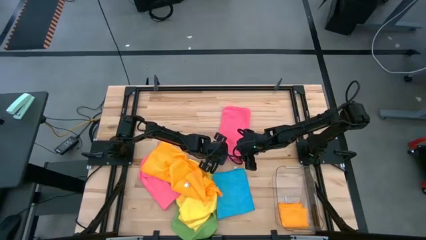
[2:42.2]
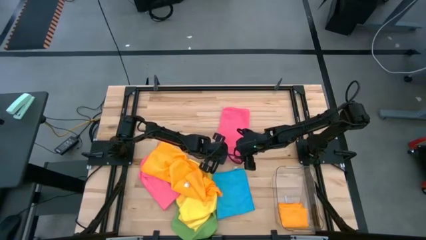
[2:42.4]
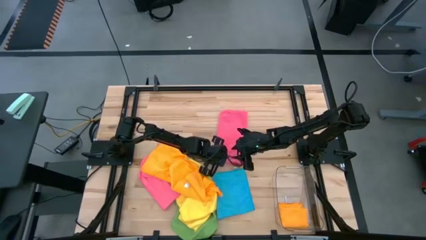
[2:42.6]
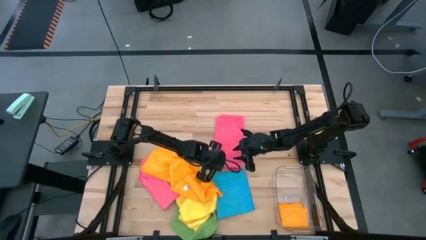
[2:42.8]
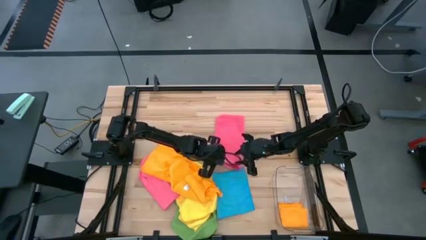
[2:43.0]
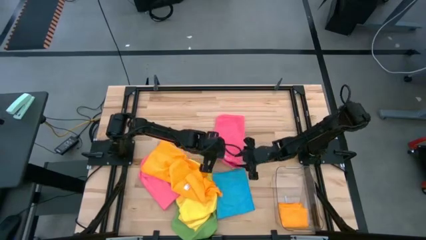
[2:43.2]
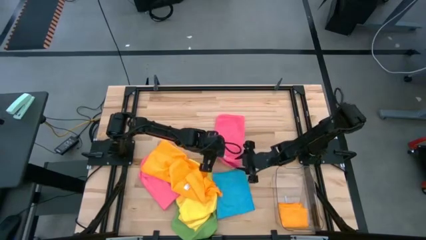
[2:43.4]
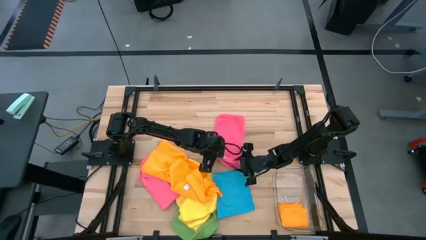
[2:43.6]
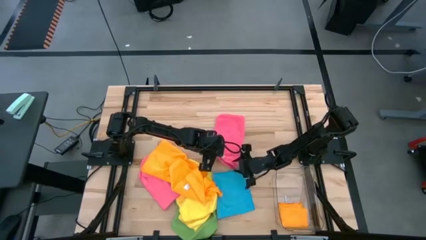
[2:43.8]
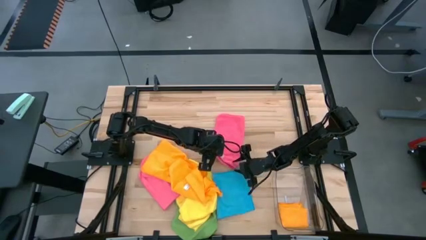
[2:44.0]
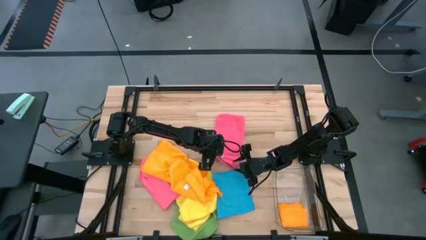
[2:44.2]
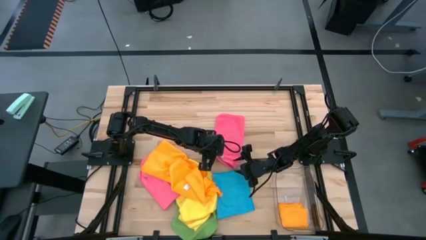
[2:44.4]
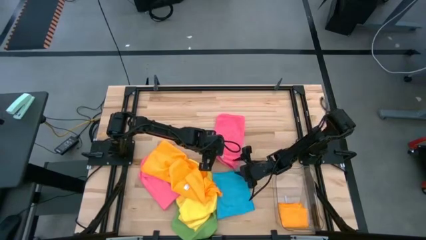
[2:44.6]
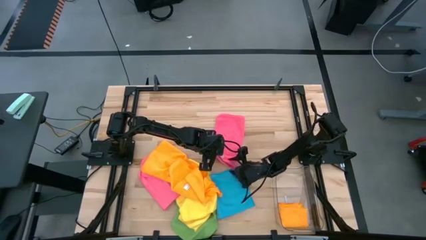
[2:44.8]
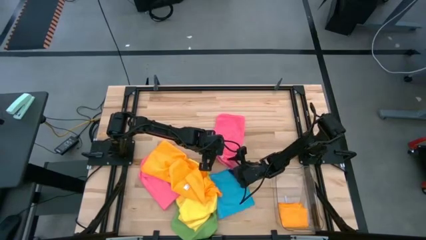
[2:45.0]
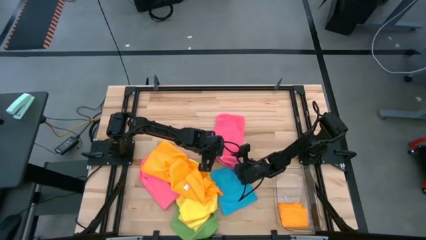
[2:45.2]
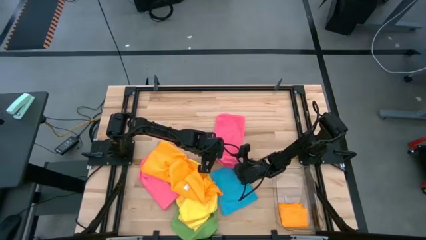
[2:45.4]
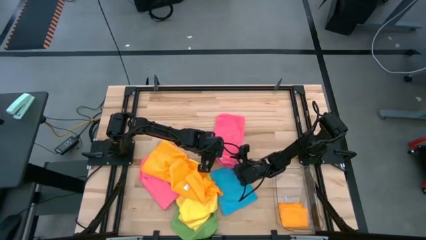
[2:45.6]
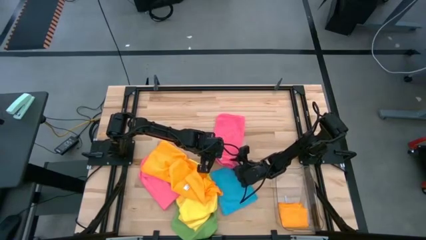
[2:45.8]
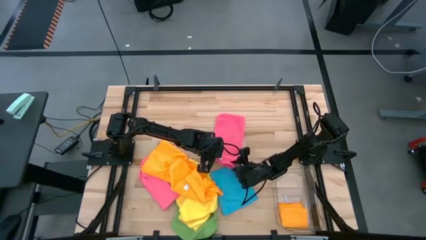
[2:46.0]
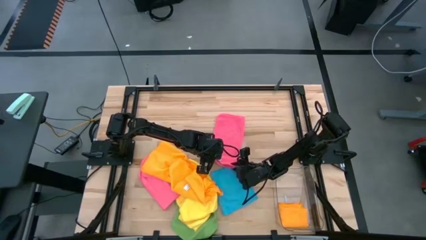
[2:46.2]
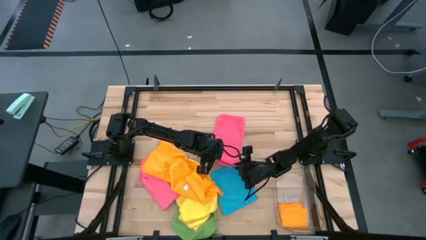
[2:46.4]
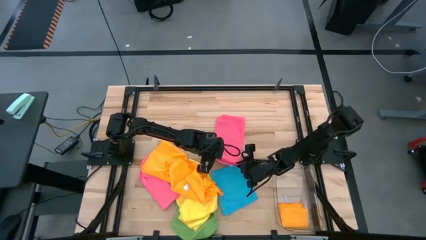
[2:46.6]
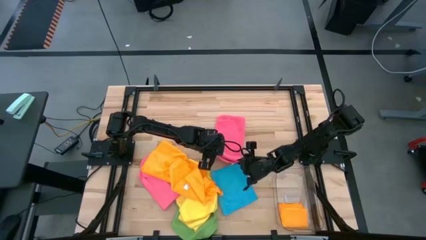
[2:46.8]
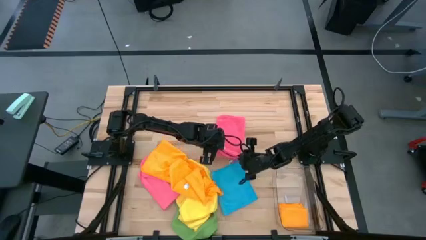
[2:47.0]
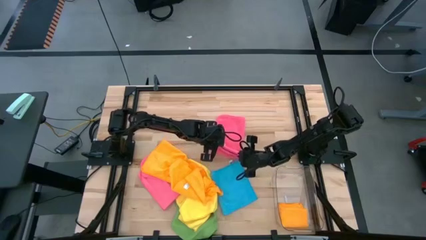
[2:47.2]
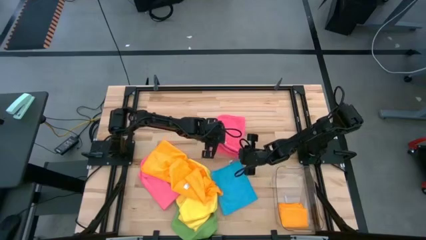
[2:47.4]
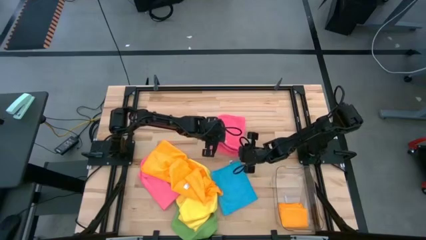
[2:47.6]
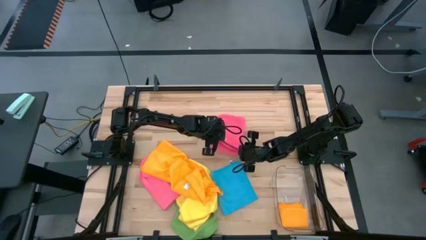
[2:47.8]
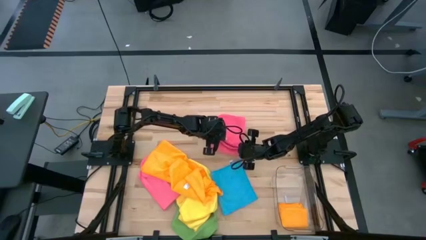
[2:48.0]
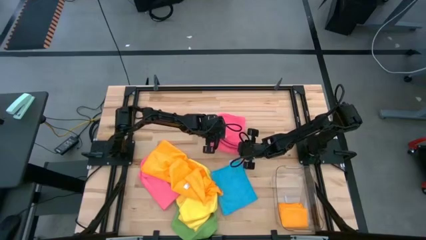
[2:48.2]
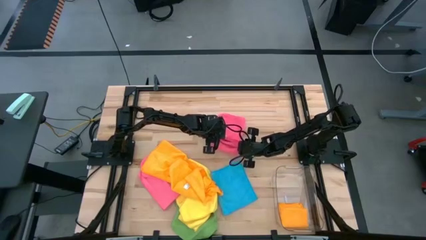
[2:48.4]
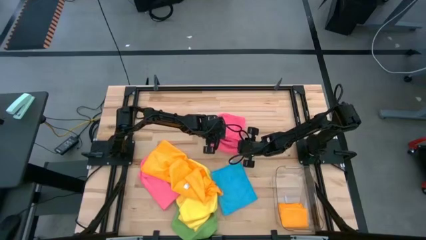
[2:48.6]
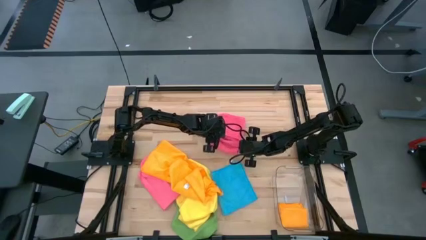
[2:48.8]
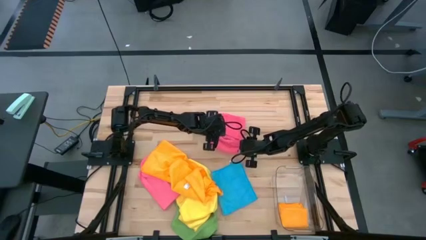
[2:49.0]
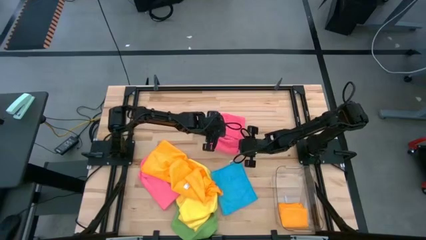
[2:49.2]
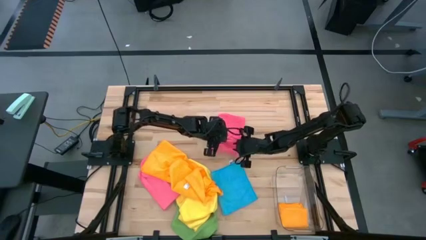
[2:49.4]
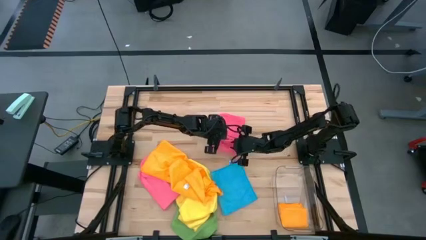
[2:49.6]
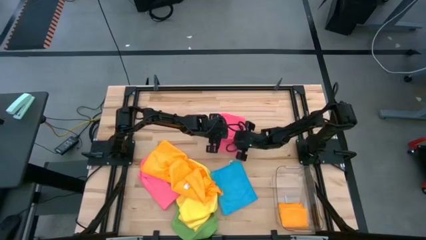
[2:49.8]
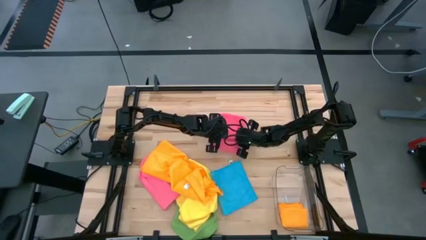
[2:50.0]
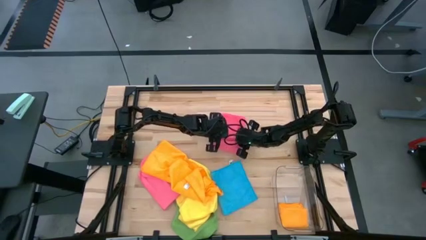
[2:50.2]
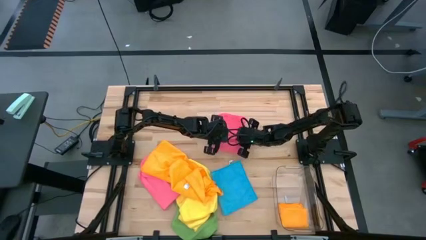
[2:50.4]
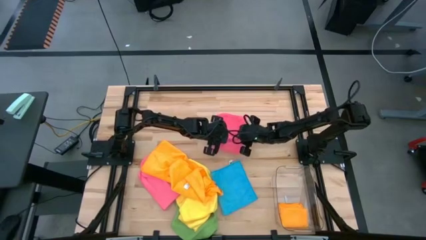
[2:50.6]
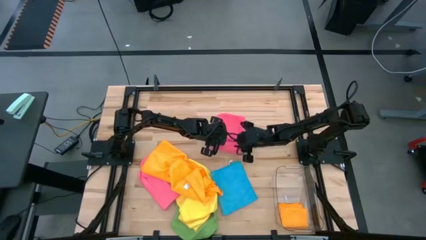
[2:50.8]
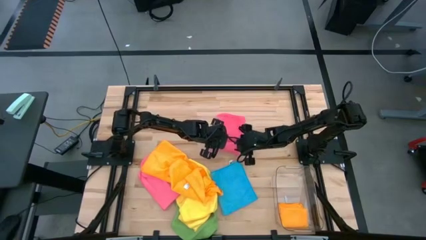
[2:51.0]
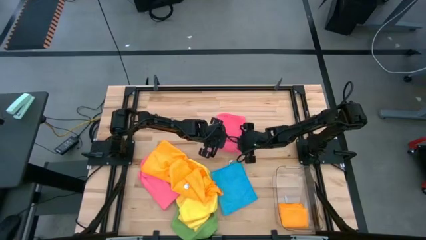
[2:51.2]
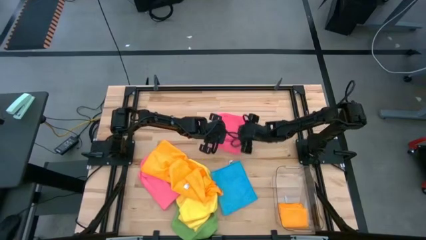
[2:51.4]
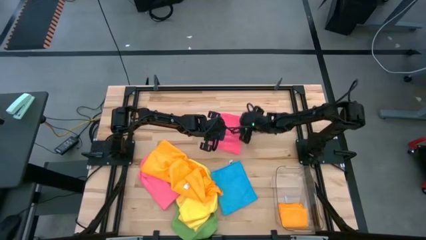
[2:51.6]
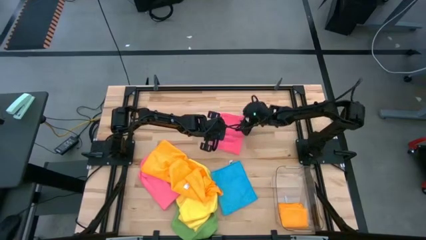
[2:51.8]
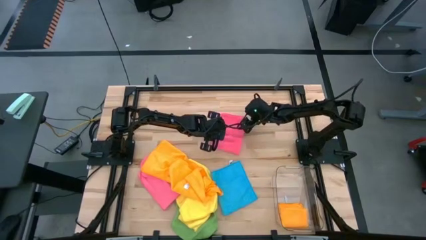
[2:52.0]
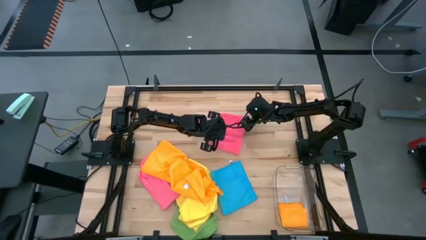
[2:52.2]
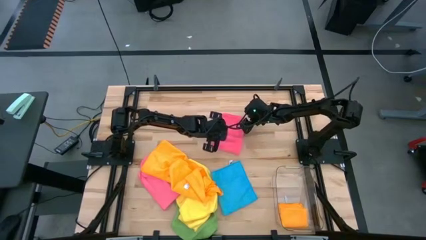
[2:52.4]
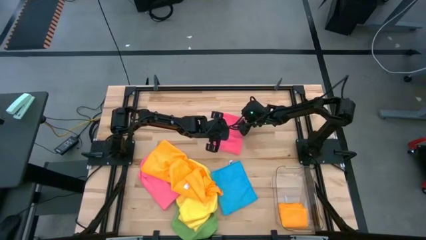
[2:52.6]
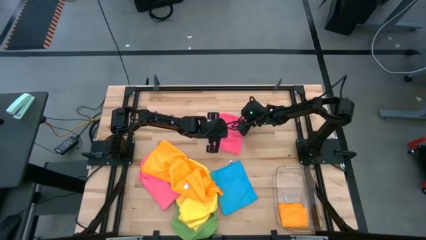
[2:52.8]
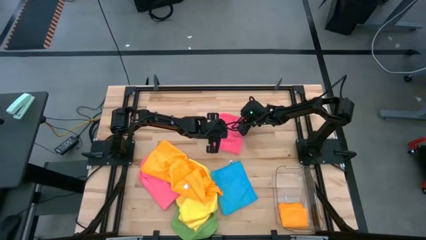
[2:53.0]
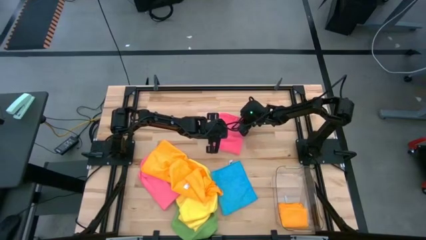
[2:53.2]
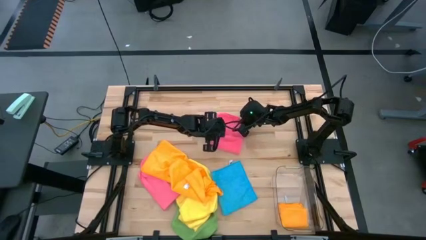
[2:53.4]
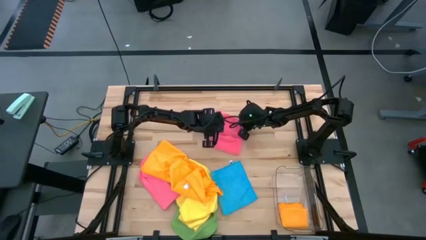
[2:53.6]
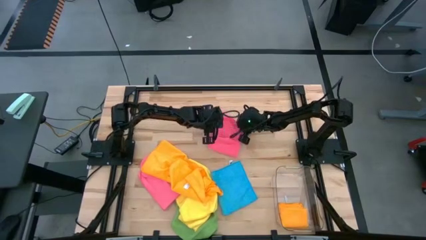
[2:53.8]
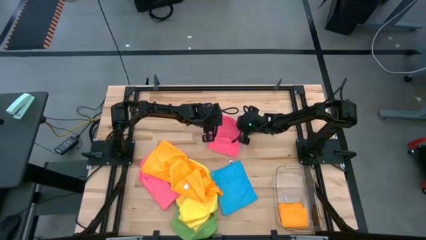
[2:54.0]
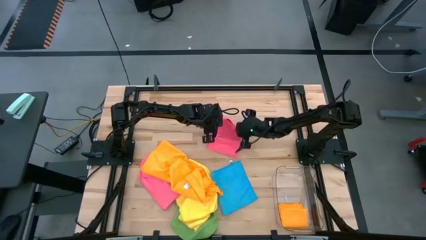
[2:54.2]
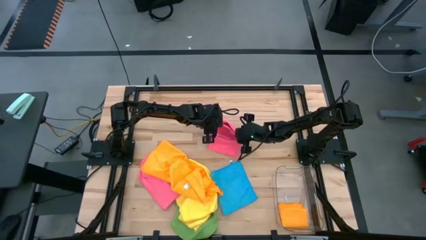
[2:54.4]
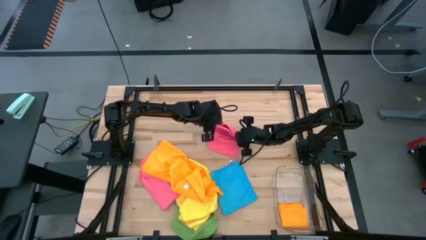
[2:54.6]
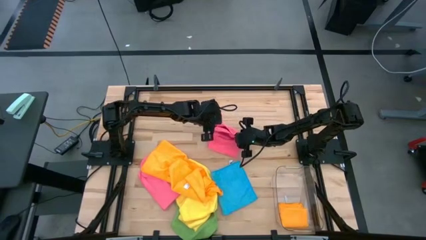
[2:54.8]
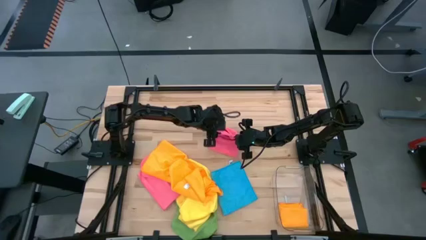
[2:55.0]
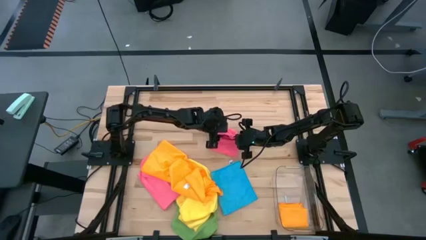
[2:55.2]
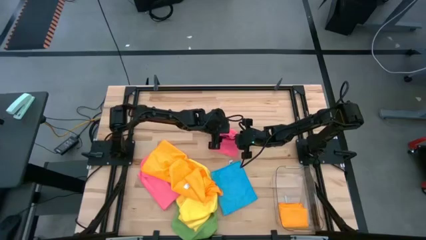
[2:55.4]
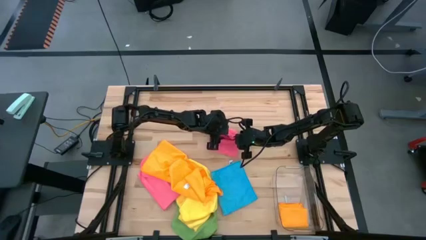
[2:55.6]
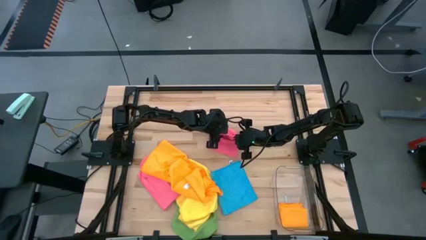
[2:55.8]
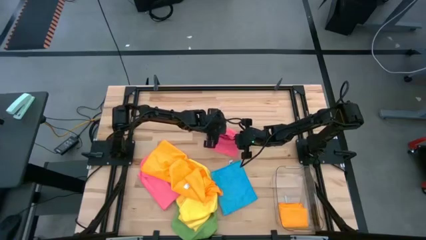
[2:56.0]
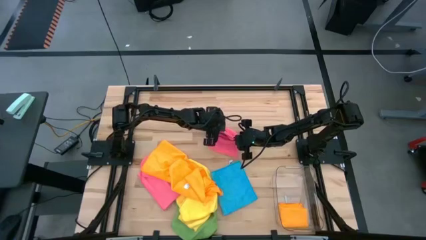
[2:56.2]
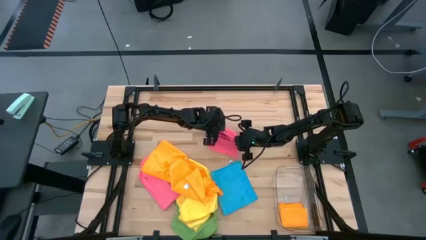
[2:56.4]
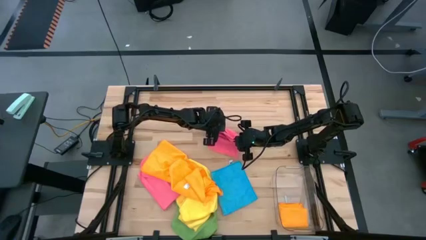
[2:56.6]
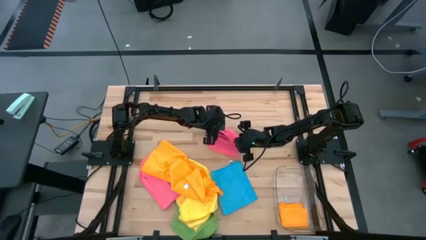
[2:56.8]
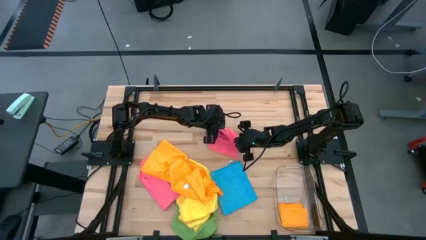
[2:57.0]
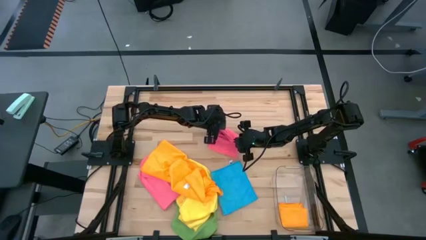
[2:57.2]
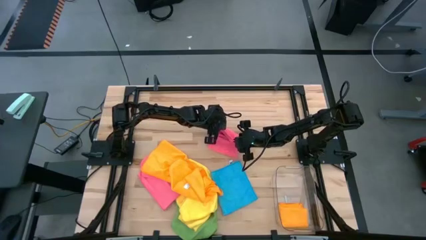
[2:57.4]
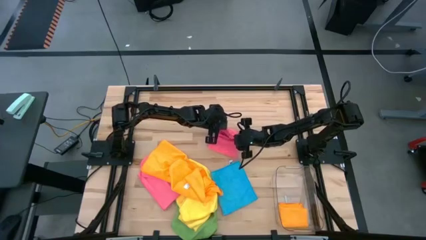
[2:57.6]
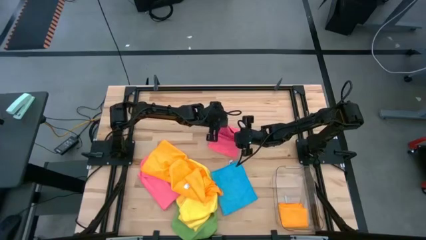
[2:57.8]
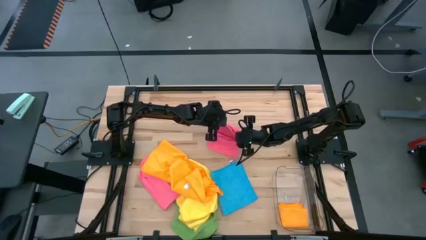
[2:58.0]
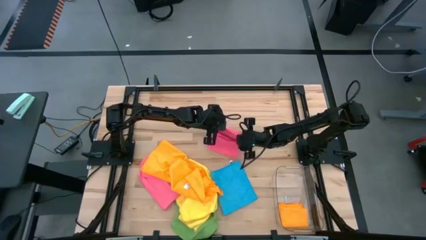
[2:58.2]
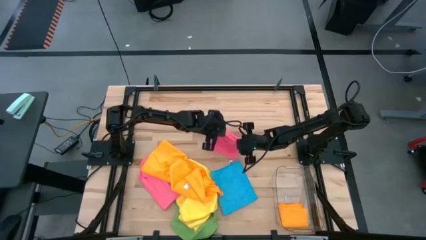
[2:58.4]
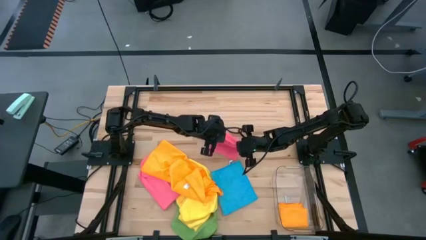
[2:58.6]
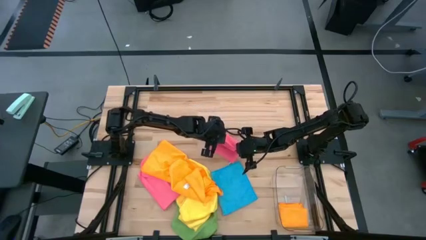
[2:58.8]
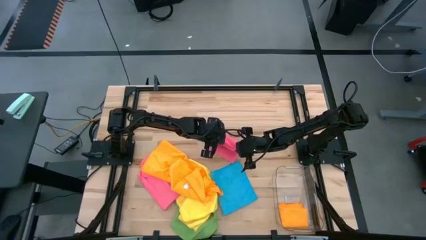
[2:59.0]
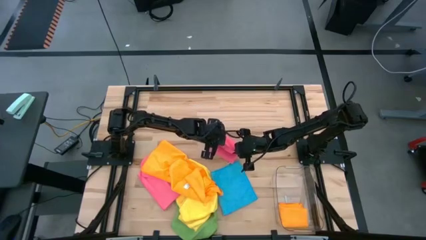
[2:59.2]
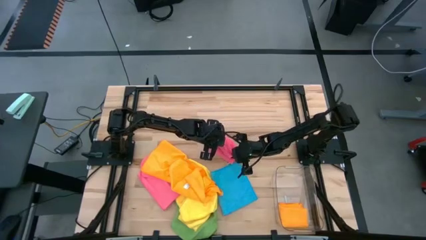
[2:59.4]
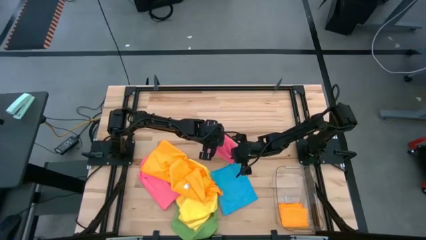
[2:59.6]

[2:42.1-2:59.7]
Task: Fold microfiber towels
Fold the pink towel
